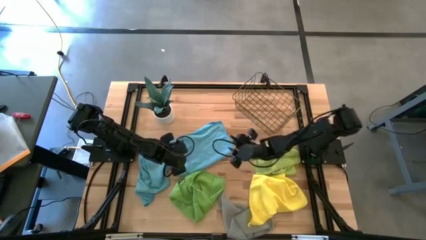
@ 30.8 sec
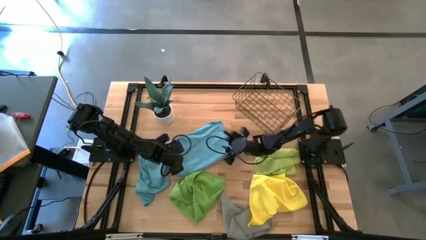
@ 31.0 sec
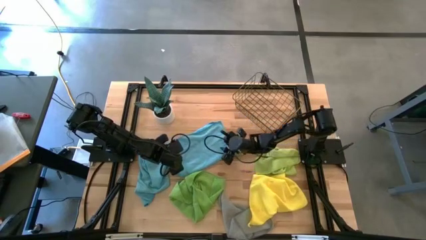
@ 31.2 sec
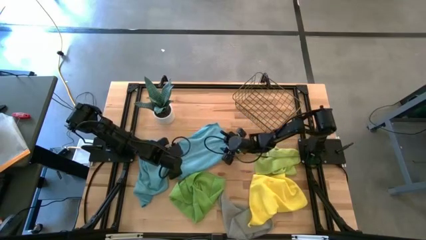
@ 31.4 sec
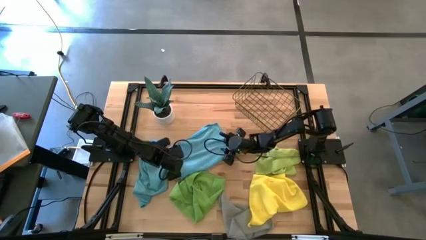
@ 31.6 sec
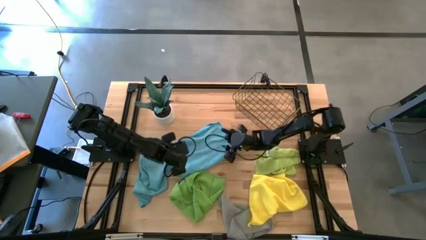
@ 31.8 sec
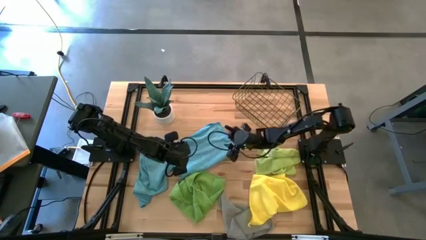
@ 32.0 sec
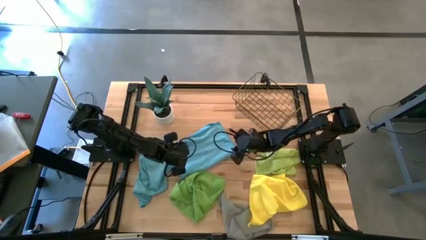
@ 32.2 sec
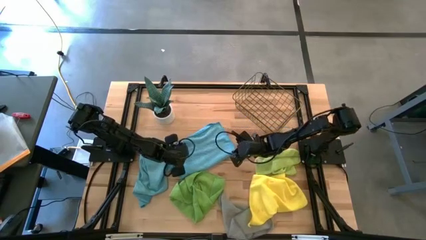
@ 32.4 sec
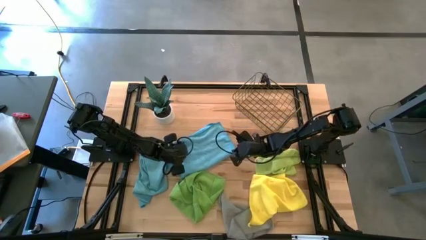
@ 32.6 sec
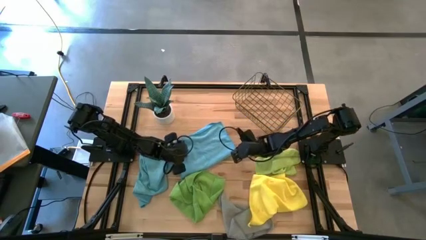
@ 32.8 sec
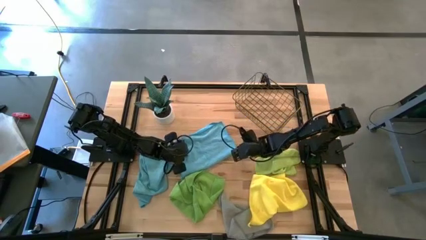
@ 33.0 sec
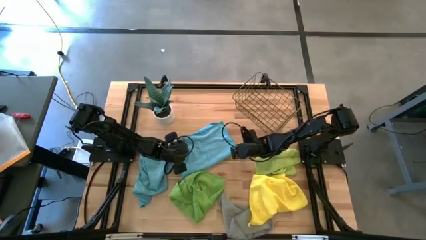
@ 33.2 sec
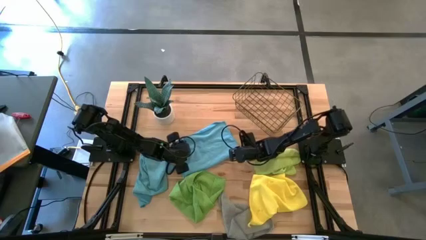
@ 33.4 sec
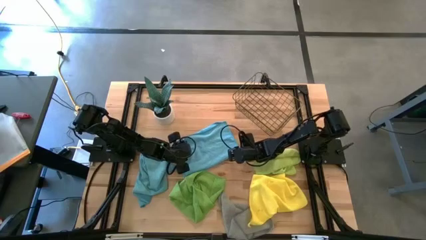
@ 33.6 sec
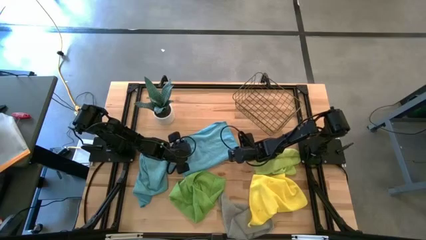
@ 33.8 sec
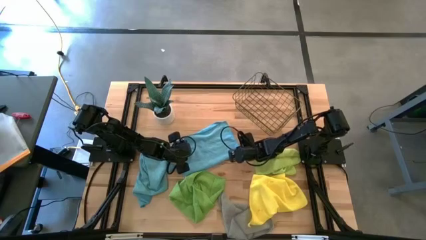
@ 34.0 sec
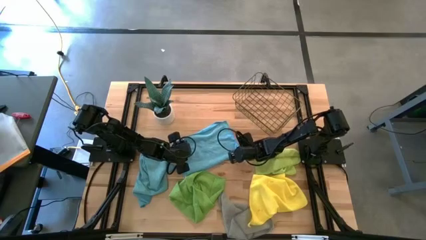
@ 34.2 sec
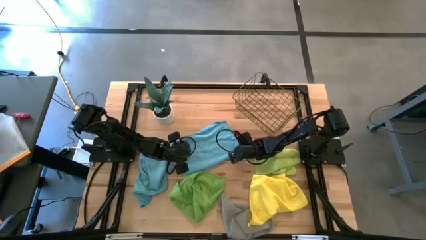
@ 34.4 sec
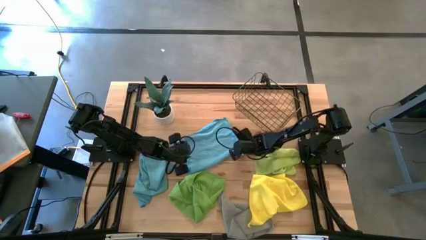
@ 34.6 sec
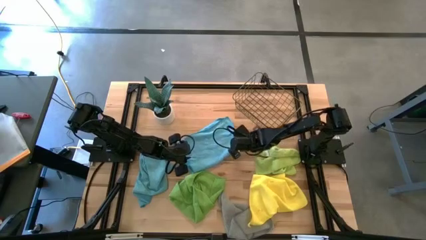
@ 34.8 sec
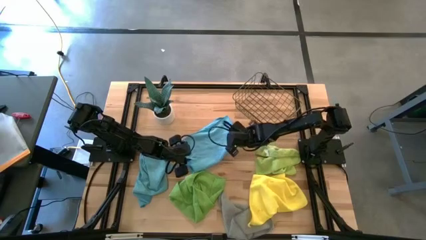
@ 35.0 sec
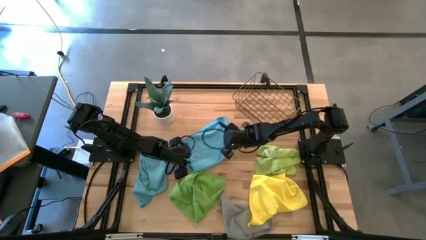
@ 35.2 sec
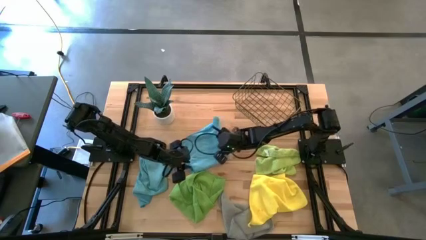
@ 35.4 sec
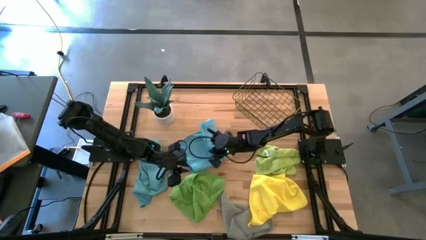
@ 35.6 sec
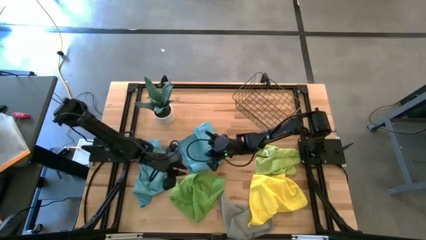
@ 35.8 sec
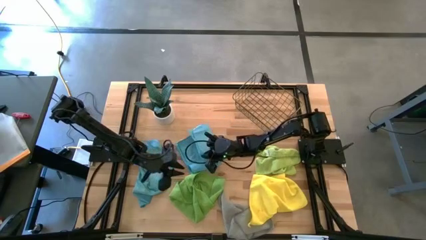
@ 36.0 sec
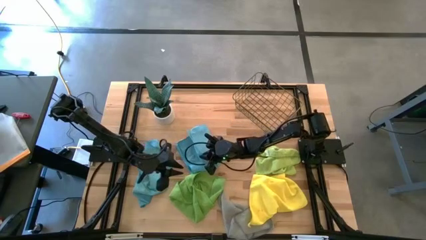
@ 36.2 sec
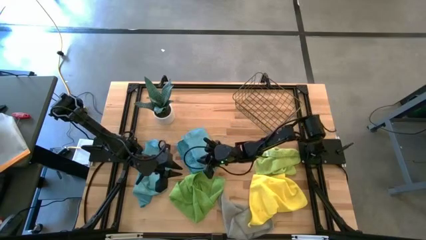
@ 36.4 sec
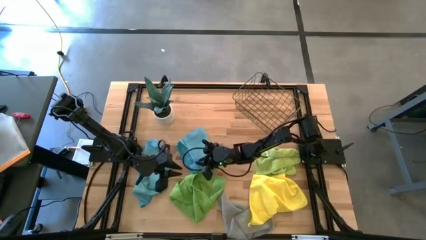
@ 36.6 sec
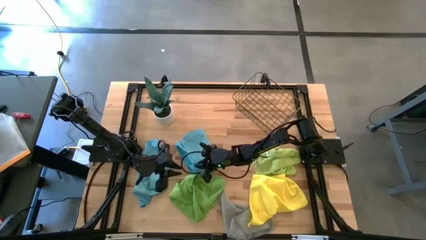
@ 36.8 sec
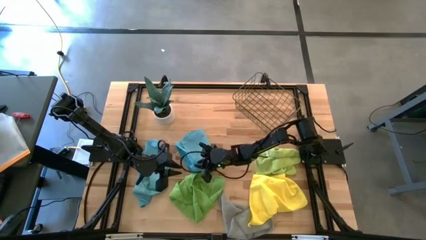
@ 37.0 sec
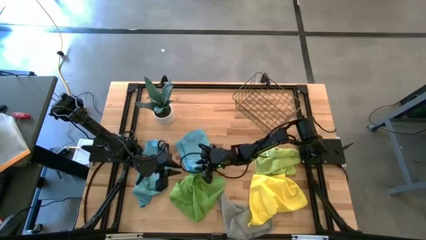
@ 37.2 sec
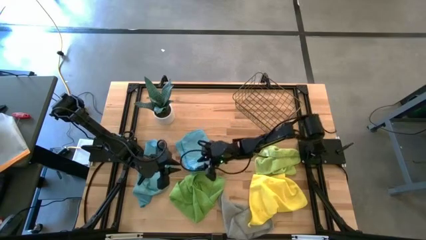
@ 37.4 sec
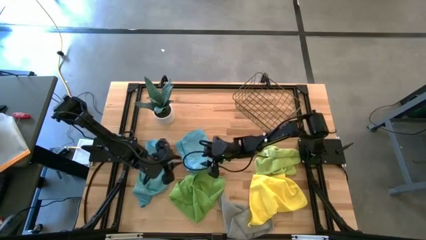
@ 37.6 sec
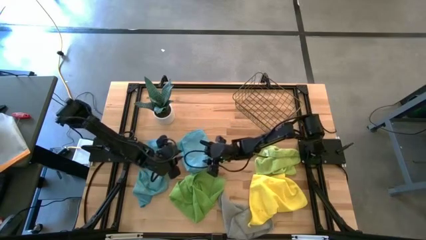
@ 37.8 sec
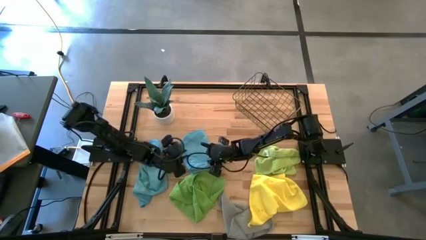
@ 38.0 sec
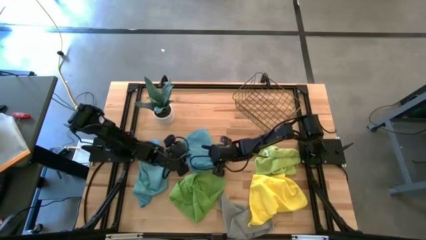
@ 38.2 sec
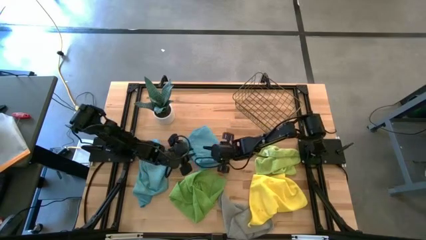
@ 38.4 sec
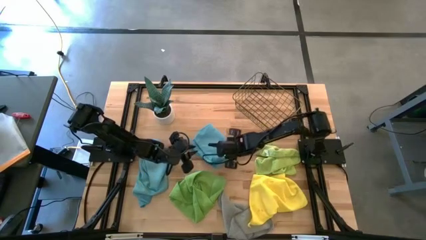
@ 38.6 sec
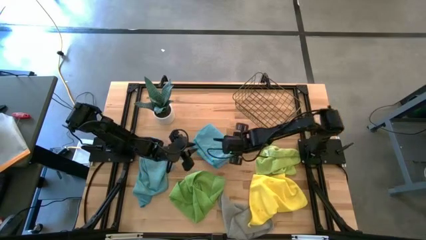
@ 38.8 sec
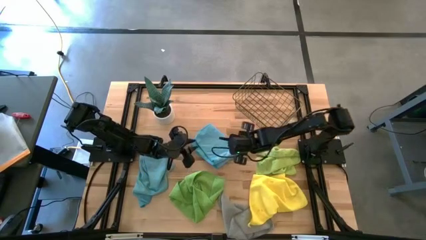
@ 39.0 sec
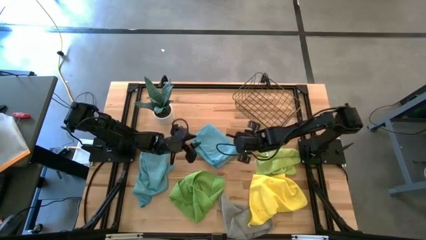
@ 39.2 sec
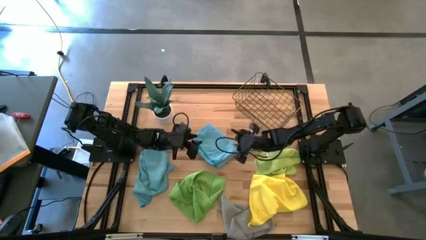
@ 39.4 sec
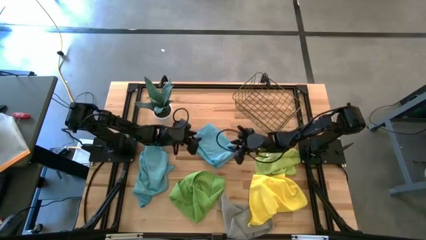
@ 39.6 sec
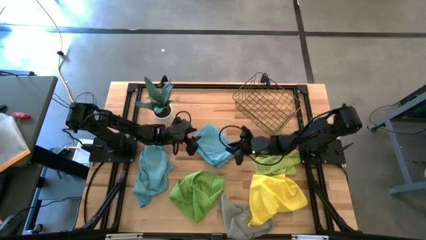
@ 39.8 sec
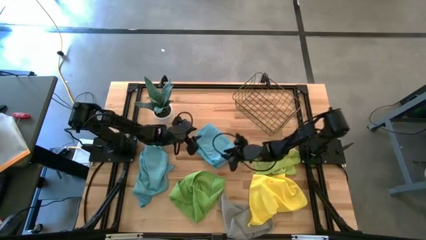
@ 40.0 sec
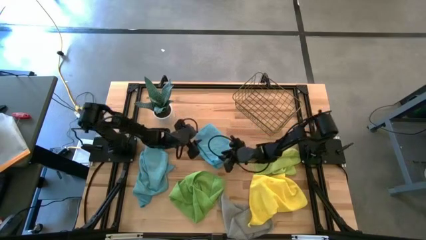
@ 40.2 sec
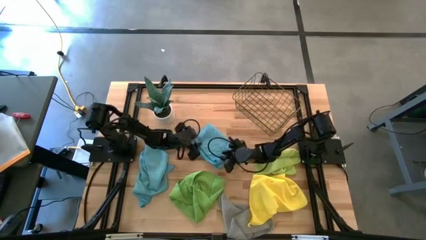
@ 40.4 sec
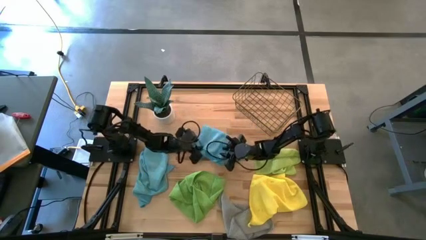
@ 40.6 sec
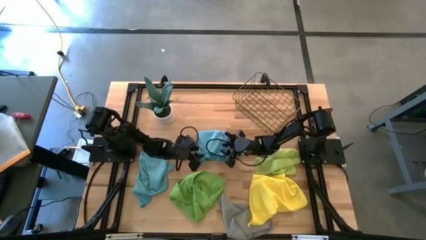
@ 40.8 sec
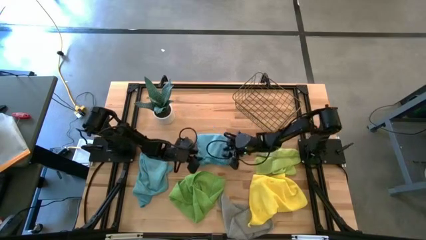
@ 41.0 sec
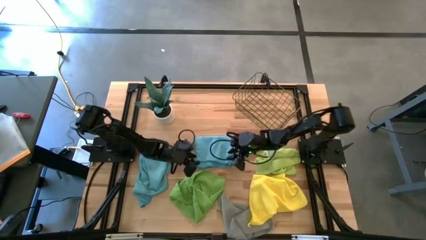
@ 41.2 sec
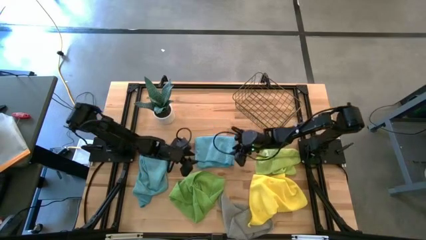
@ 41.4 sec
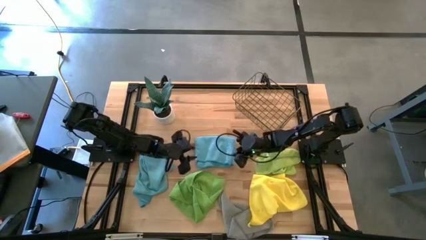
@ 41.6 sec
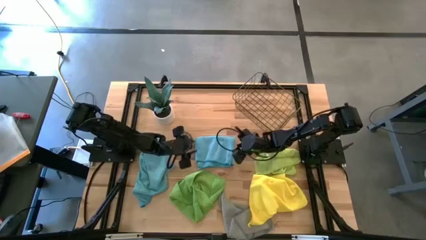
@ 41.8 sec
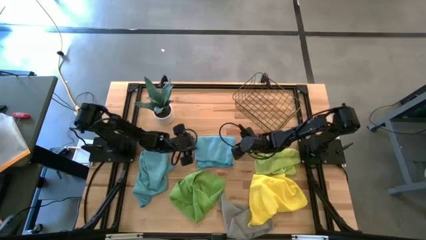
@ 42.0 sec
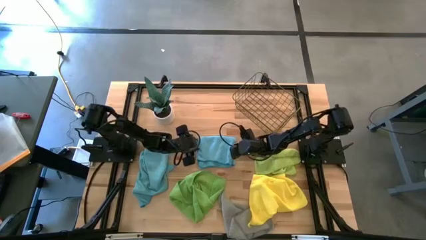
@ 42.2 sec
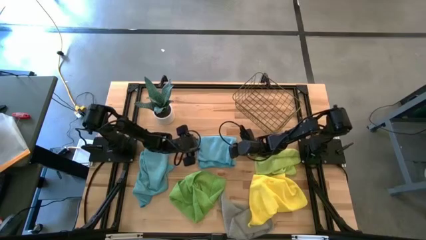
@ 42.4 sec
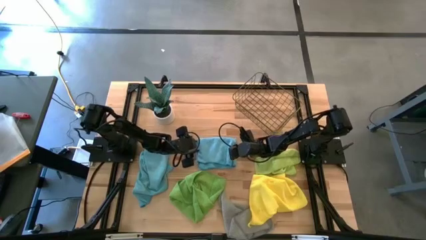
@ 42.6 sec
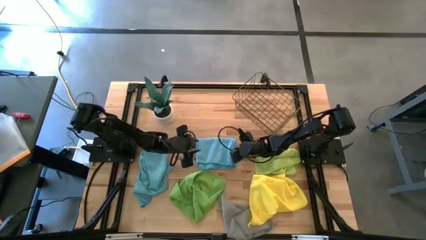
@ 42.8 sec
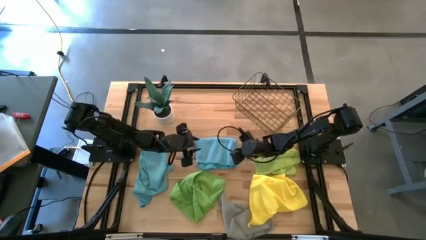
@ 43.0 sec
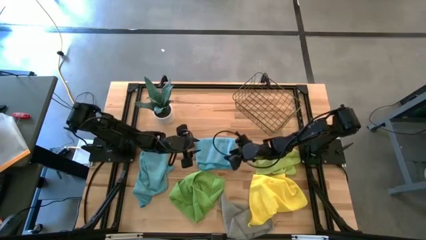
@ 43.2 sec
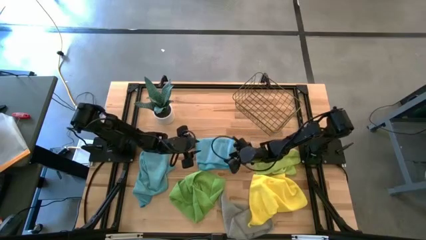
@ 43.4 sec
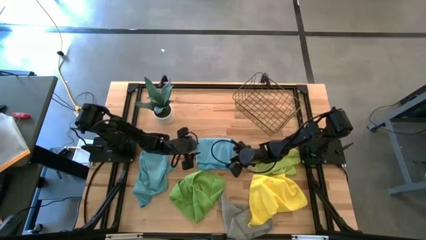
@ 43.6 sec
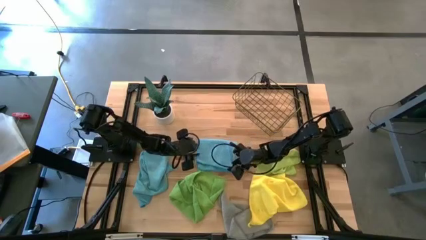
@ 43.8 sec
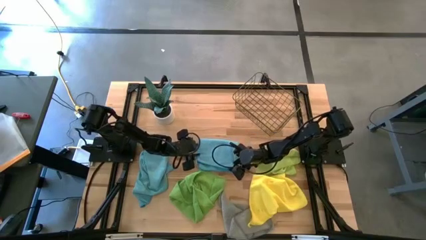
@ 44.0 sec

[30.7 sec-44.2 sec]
Task: Fold microfiber towels
Fold the top blue towel

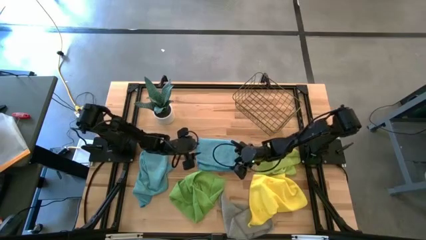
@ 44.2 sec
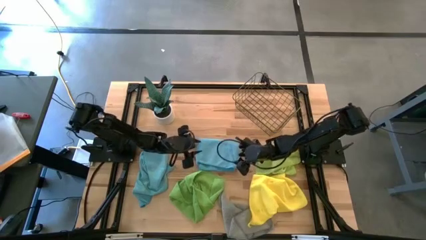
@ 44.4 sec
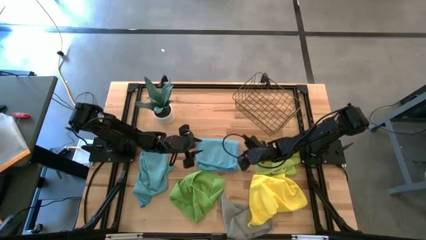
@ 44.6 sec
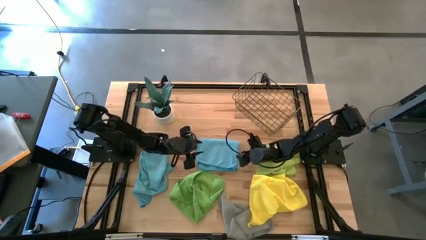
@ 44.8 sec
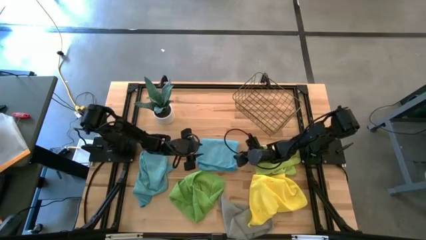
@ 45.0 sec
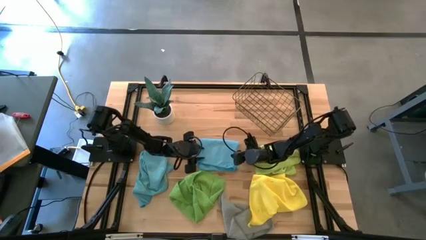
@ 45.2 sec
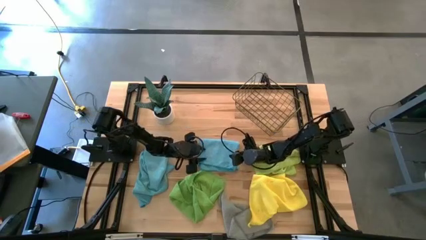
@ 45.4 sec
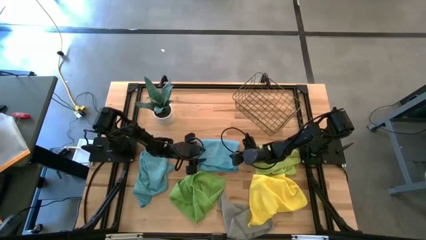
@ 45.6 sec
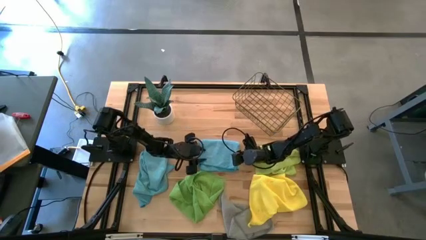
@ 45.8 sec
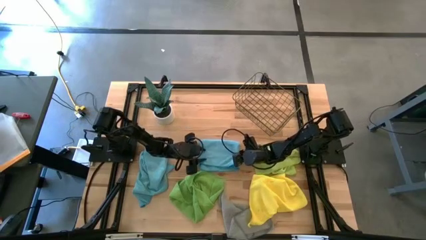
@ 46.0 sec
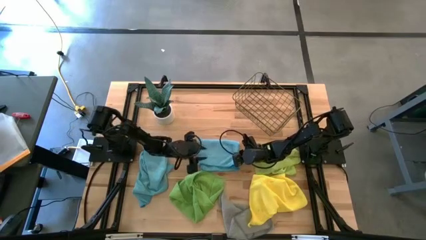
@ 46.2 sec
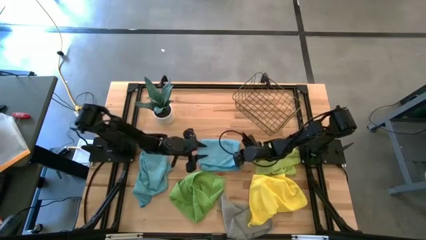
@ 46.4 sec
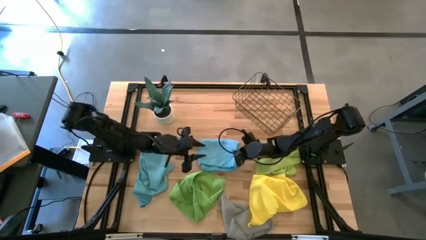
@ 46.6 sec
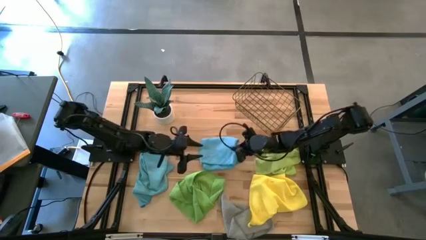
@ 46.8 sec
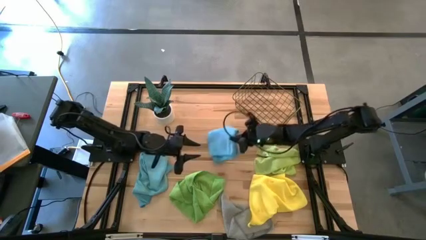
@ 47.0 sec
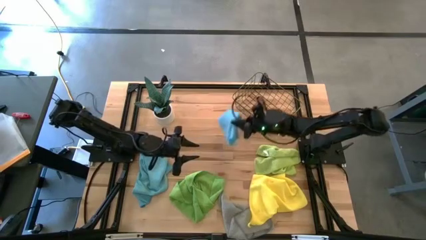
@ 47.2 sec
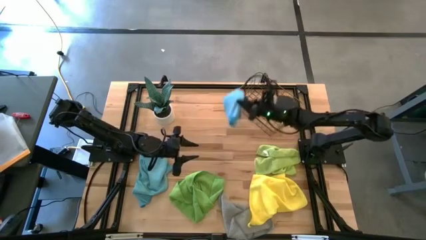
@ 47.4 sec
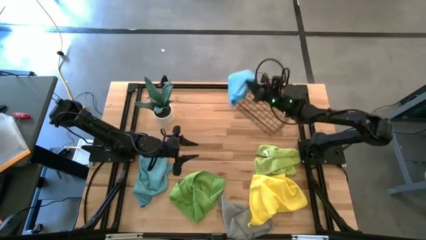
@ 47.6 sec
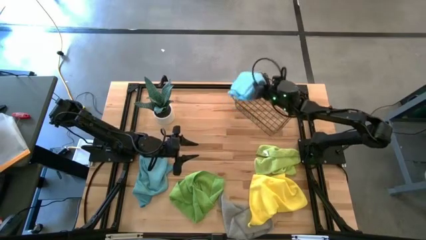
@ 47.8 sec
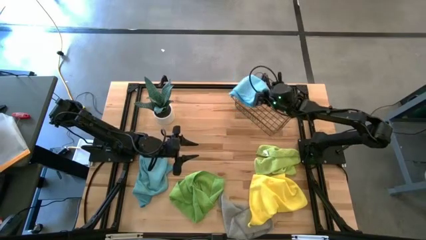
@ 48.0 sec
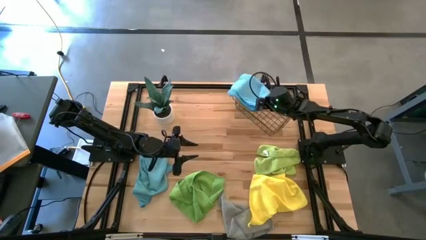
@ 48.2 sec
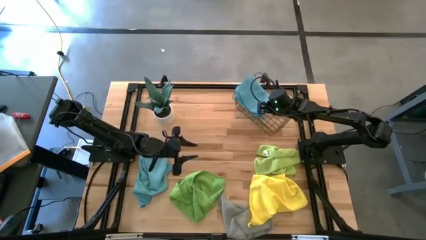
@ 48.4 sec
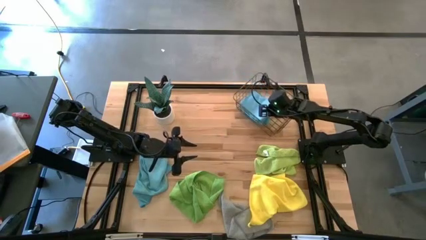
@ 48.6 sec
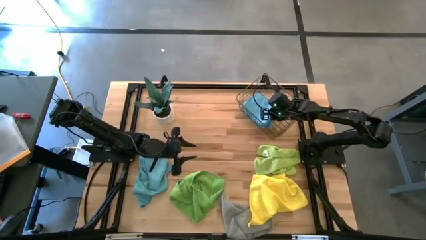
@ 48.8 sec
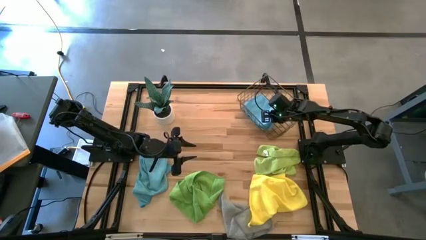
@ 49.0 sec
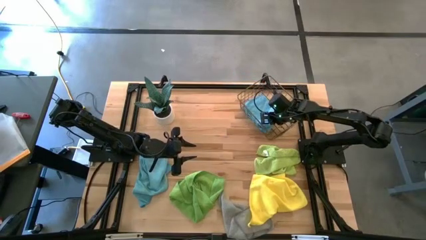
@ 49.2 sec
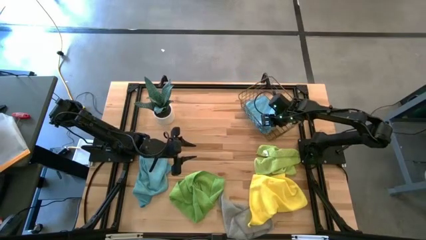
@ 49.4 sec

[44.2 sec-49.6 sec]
Put the top blue towel into the wire basket
